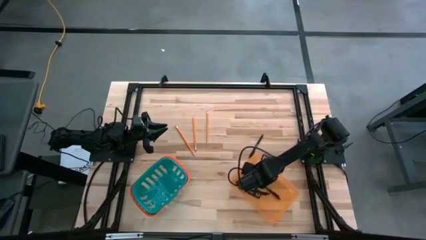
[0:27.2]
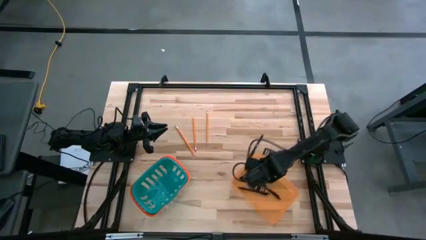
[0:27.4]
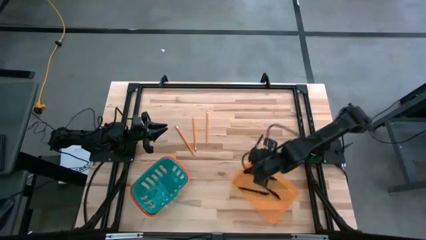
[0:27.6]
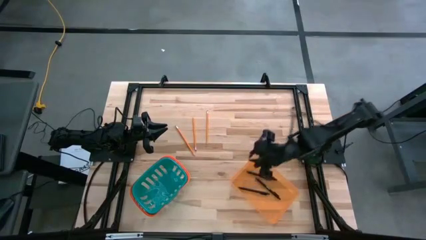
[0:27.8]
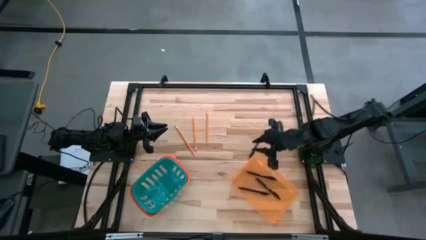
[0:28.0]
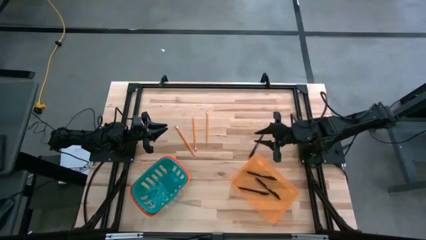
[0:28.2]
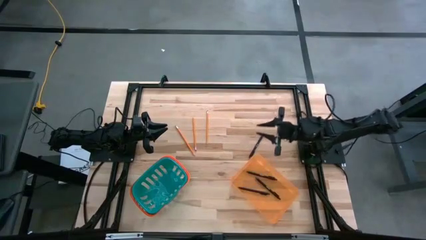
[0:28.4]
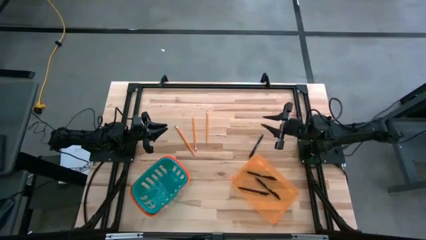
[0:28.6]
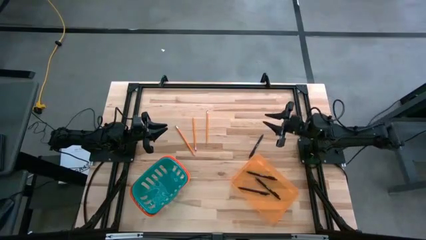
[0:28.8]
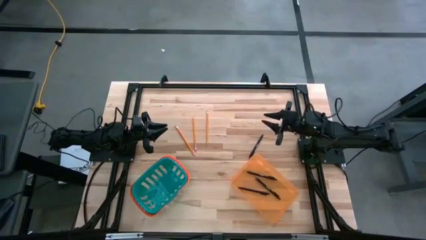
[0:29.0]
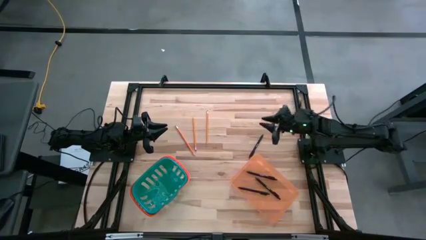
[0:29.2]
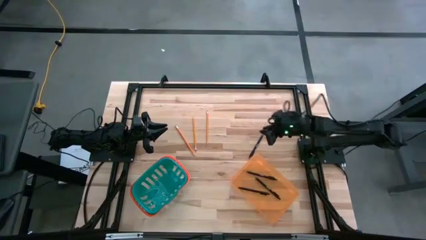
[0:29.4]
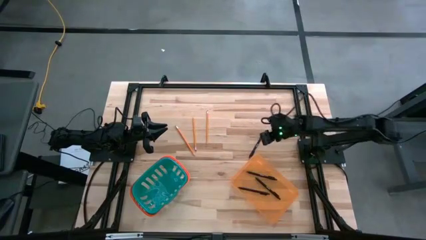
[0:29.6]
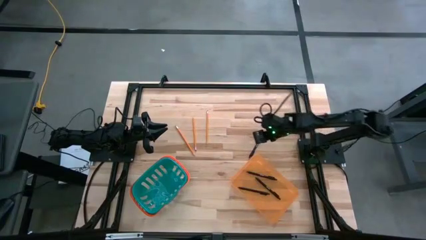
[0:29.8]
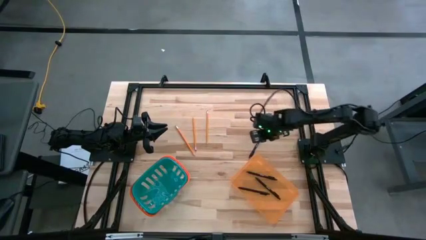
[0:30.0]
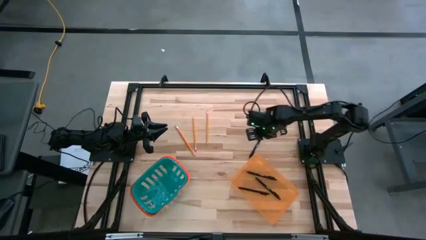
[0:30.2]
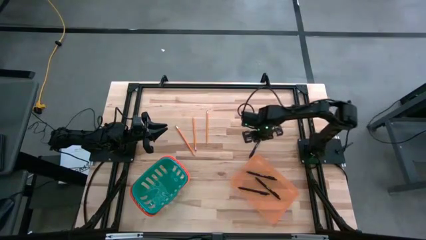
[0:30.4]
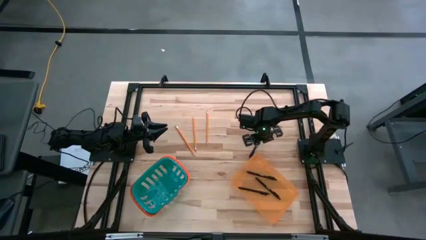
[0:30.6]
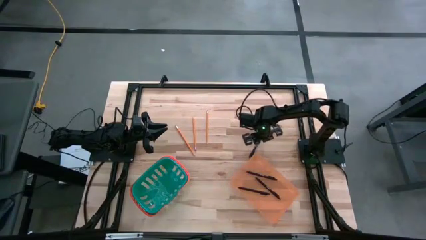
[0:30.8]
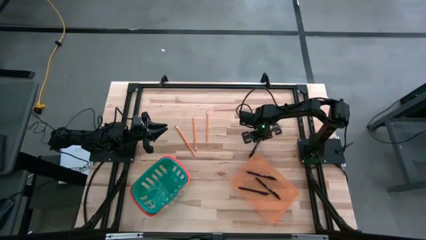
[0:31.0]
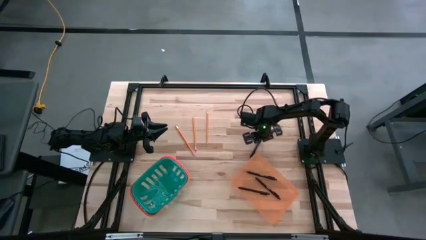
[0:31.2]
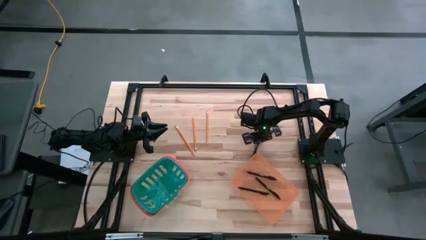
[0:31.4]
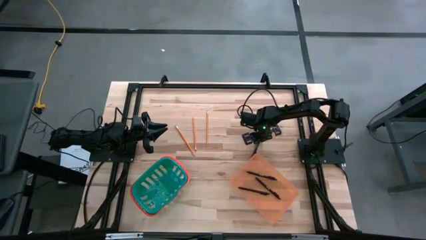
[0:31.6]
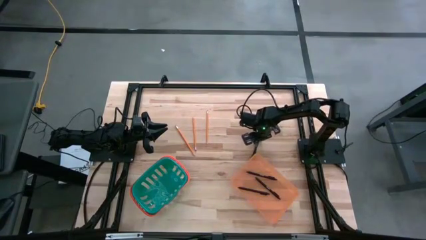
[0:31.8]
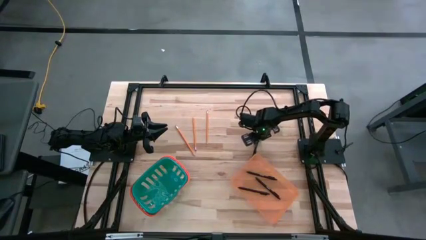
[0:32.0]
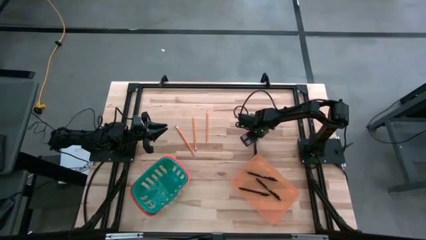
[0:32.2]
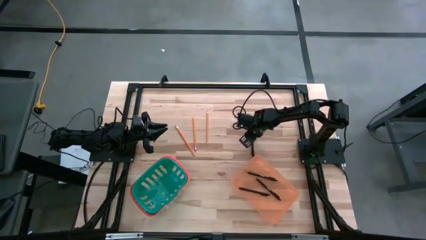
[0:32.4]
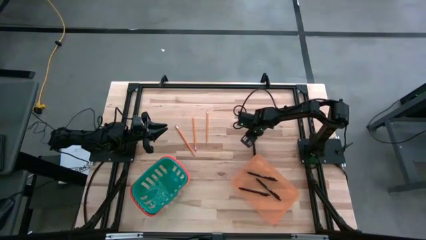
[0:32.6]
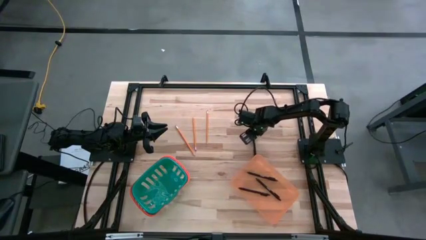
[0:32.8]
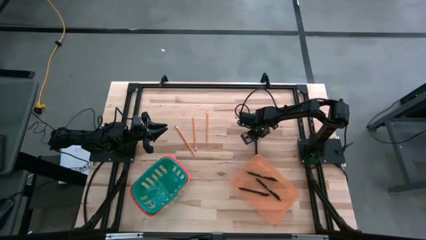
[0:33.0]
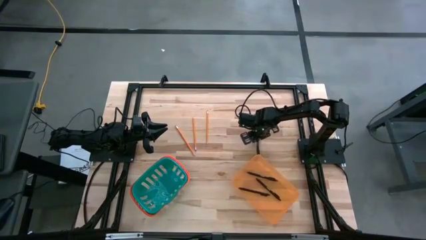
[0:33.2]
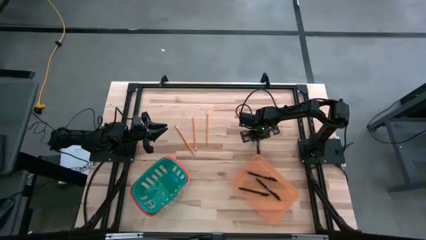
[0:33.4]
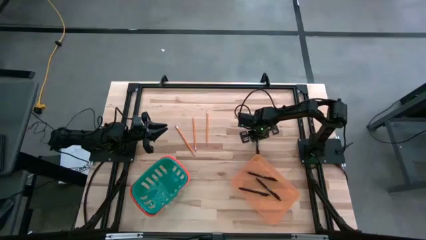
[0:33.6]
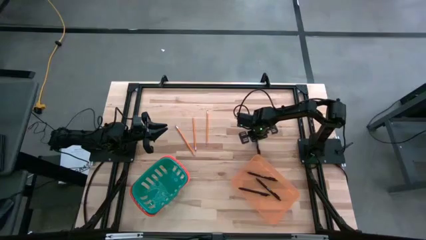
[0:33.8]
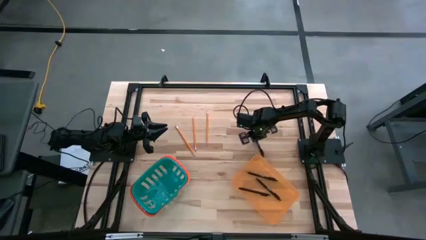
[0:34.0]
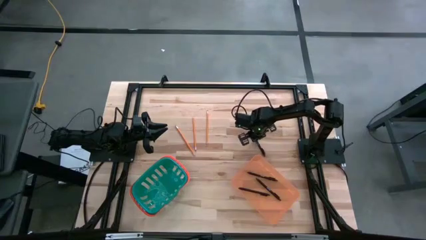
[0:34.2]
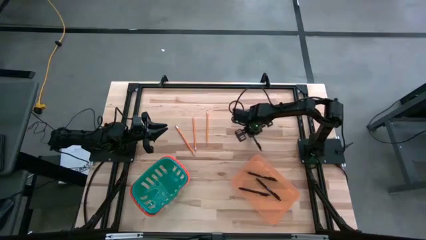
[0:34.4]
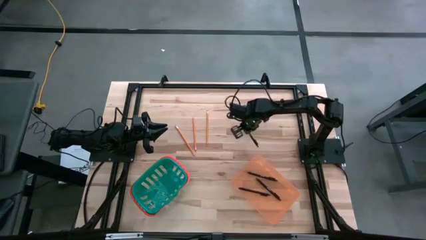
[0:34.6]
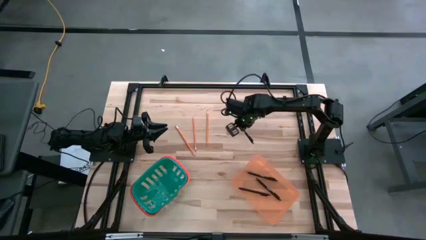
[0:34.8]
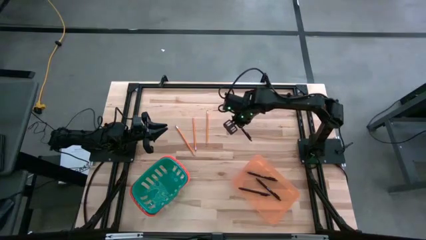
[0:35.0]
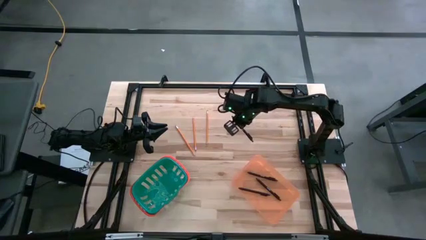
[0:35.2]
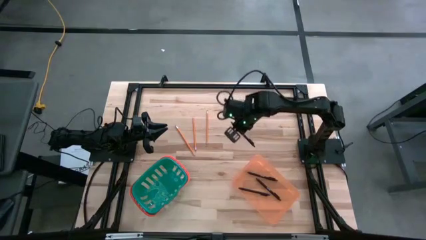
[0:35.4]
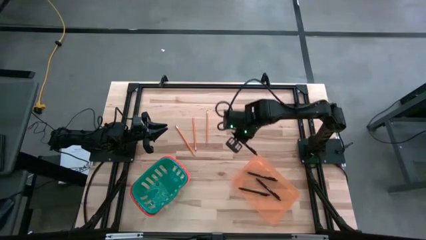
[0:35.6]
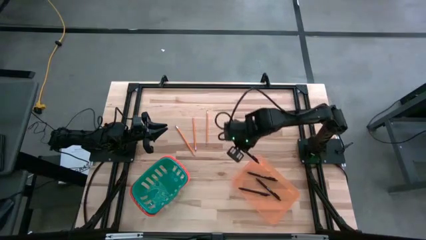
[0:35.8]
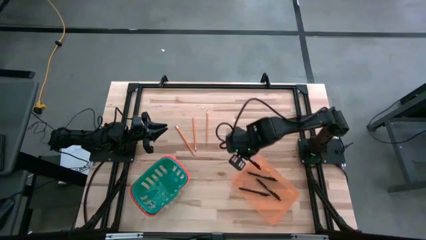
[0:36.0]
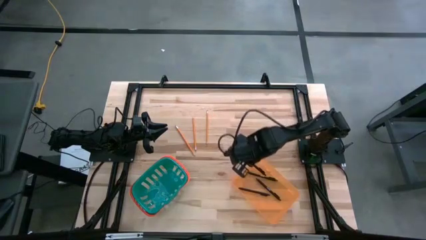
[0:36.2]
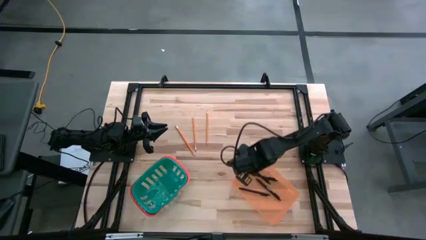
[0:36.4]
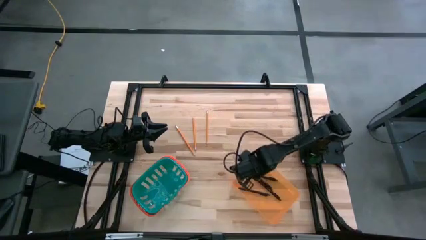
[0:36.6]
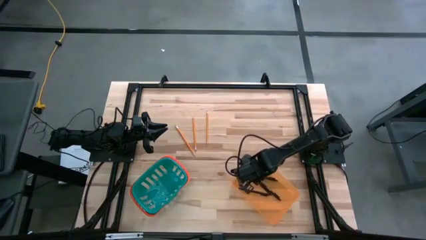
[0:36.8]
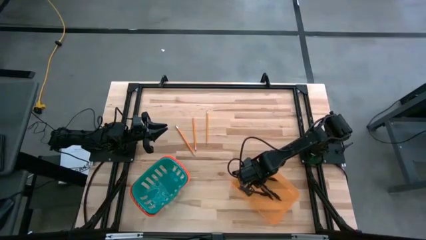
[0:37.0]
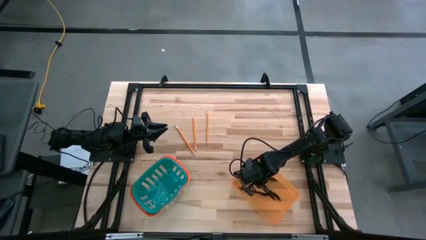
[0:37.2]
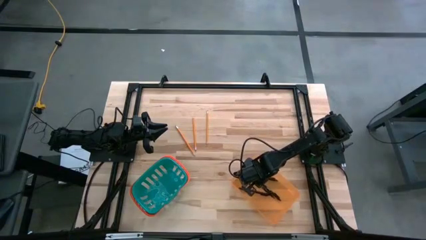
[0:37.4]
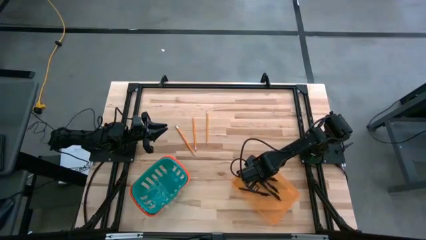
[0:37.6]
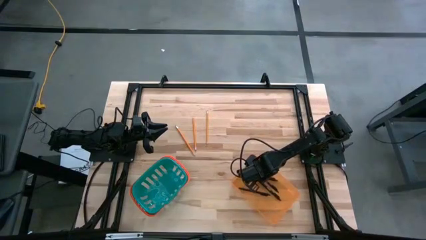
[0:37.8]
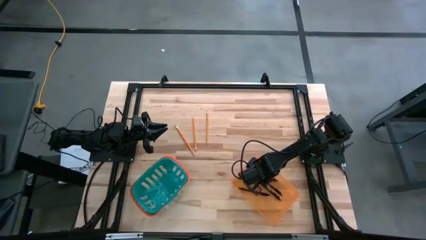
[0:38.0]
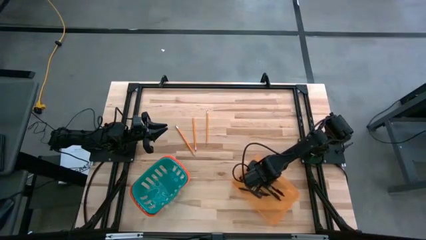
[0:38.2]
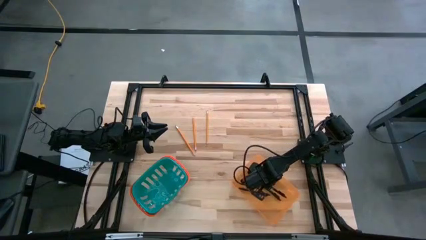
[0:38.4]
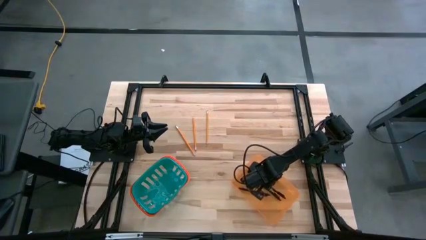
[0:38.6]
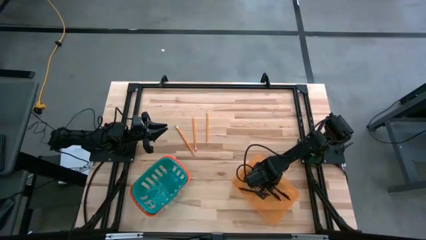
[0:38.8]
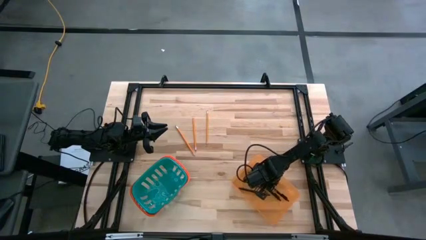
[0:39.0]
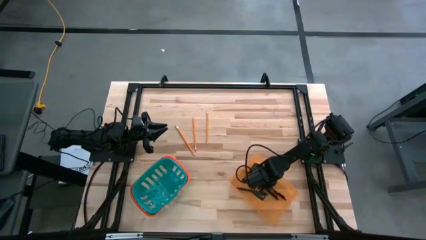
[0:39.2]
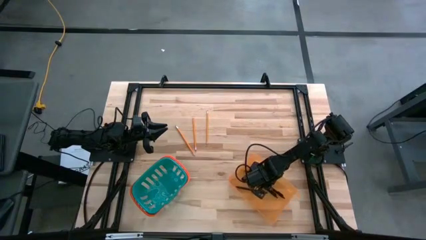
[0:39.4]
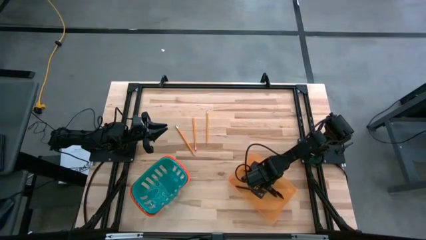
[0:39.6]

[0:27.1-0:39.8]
Task: Sort pens & pencils
Put the black pen into the orange bin
